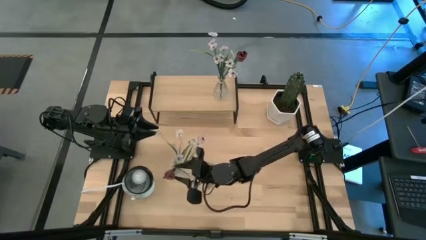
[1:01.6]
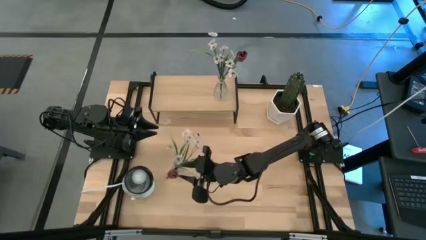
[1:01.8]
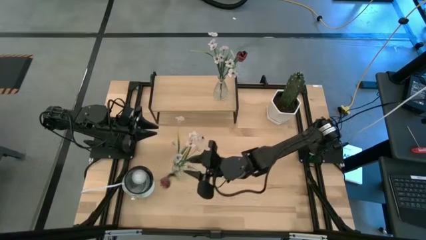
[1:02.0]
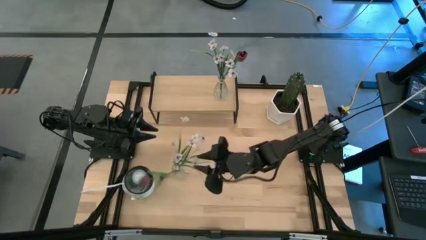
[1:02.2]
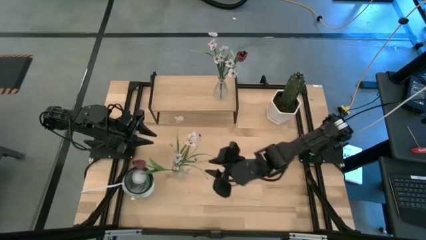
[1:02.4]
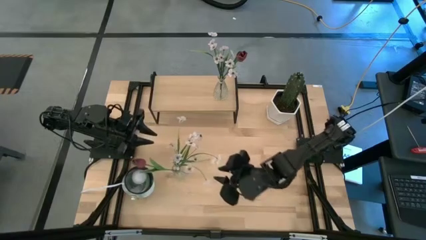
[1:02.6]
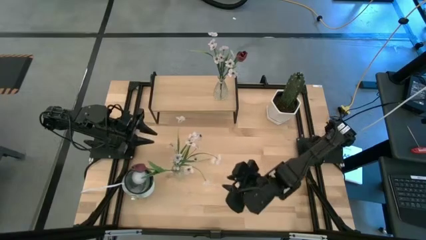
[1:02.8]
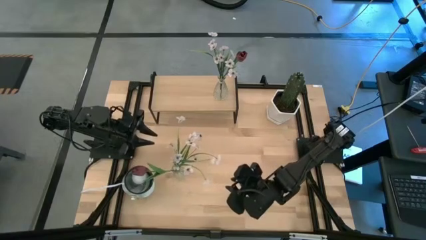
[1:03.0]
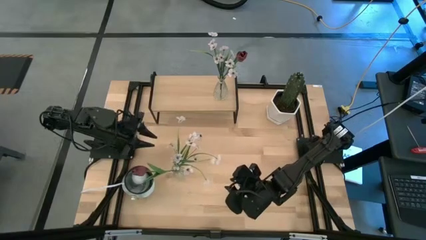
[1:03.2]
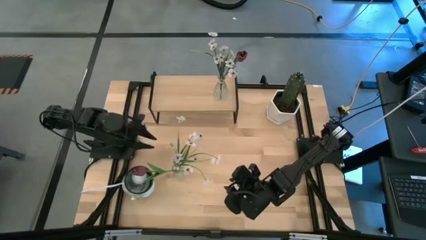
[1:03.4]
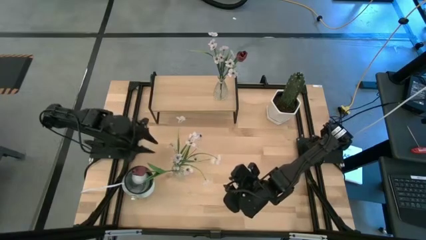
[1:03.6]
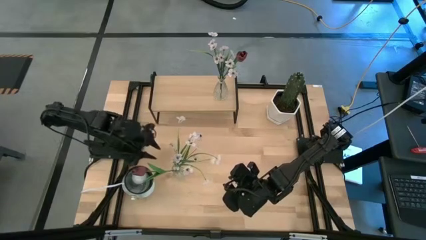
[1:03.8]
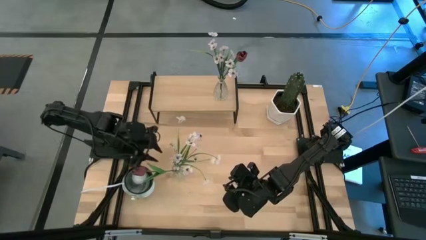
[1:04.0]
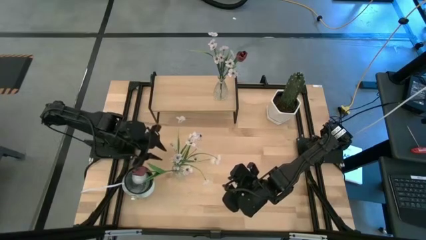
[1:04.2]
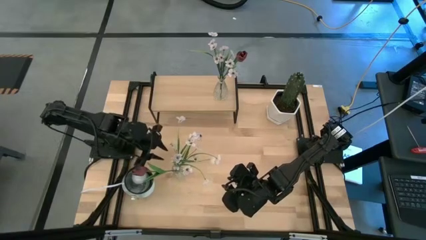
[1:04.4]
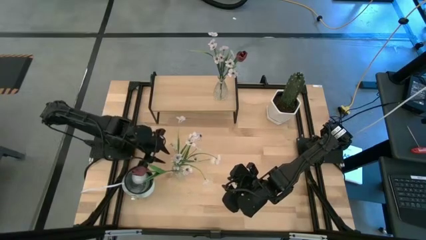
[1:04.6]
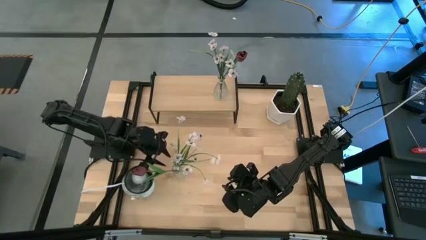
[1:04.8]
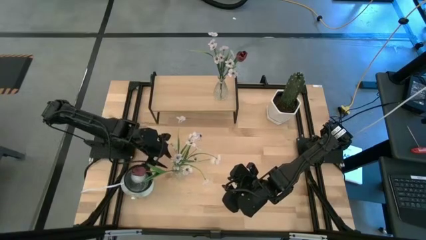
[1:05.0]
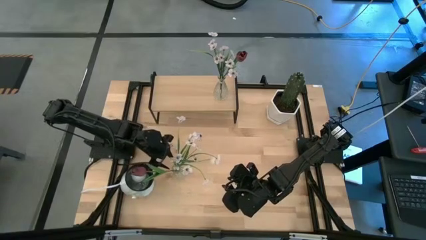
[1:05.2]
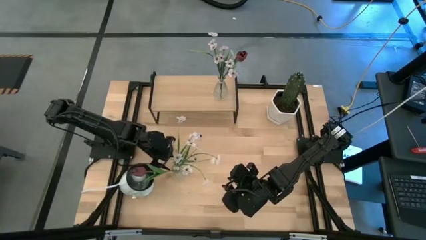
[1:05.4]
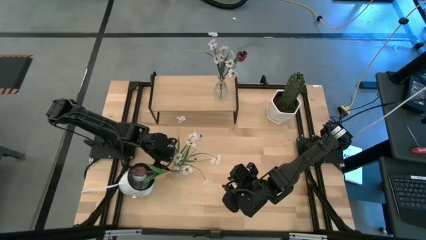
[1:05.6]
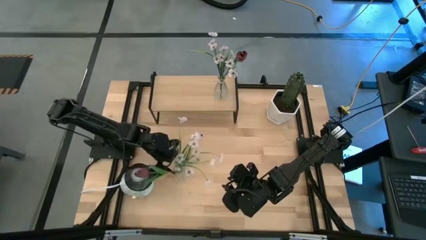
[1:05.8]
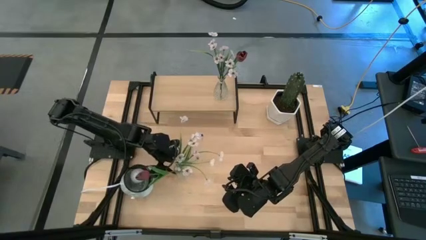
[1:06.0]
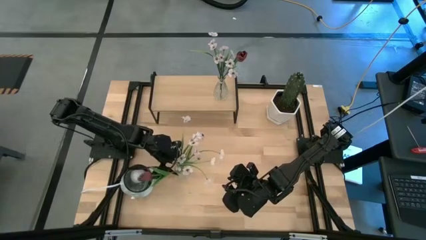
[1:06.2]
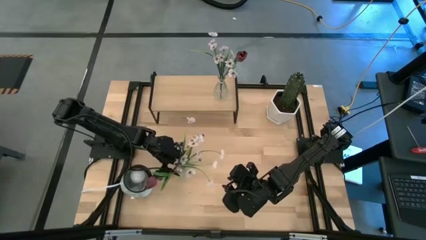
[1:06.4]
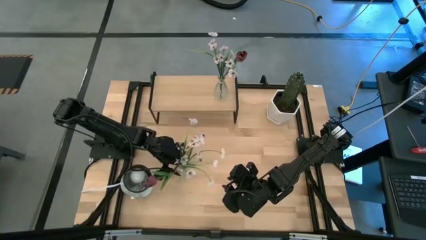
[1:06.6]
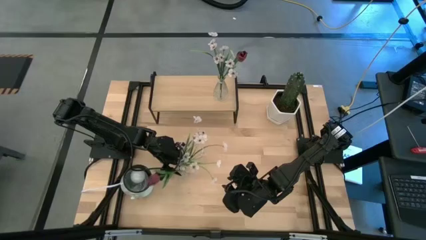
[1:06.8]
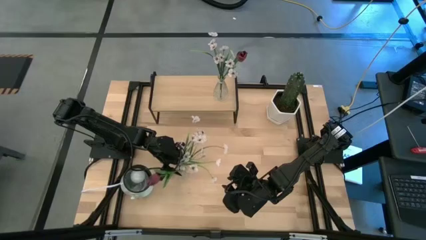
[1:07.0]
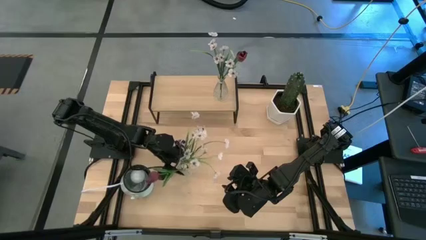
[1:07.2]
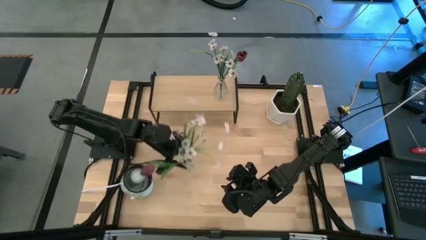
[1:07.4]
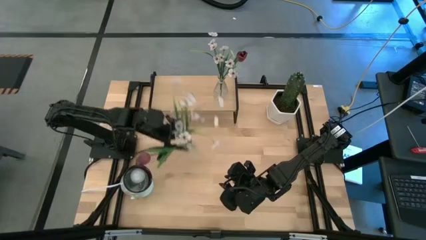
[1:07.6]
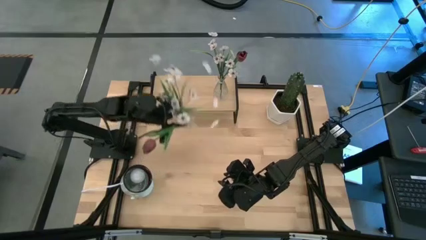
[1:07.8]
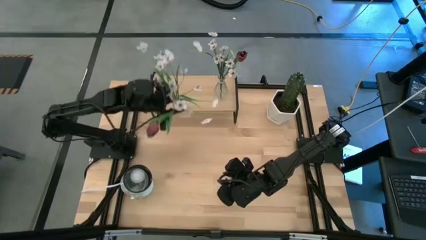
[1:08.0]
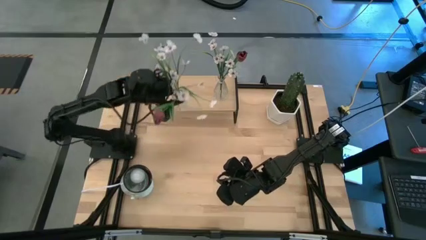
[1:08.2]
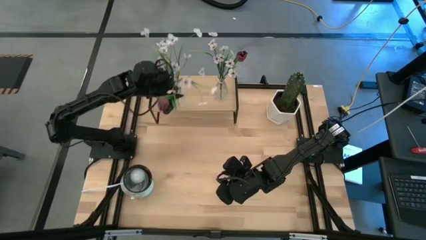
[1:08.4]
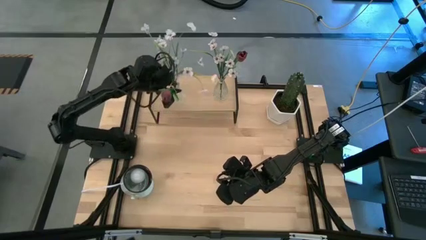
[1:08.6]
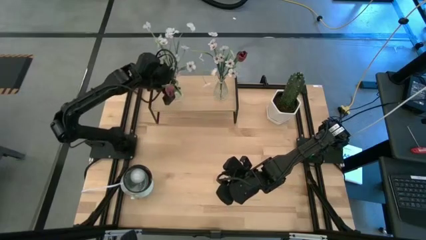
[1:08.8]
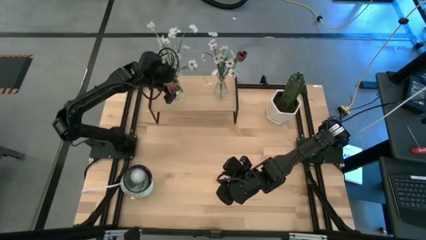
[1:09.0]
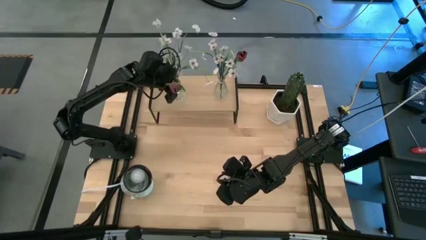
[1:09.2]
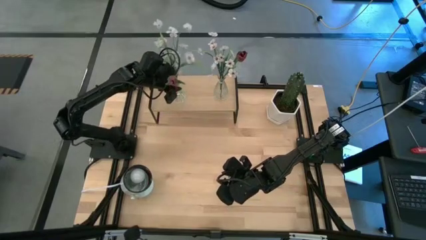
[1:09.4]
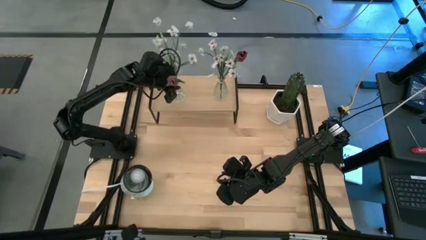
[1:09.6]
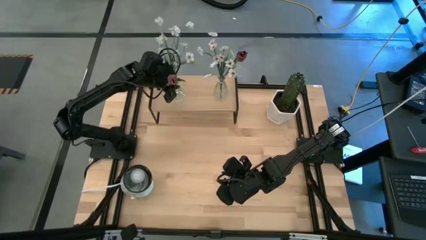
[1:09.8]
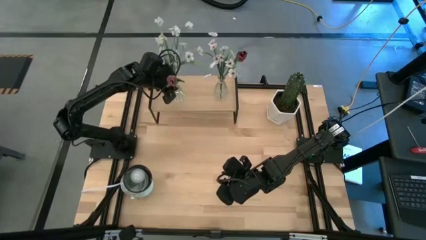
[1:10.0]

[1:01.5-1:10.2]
Task: Pick and place flowers into a vace then onto a shelf
Put the transparent vase with flowers on the shelf

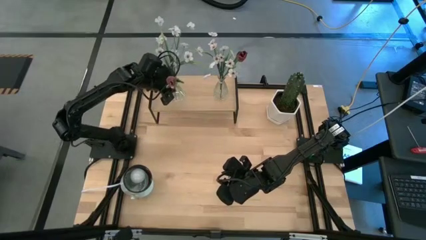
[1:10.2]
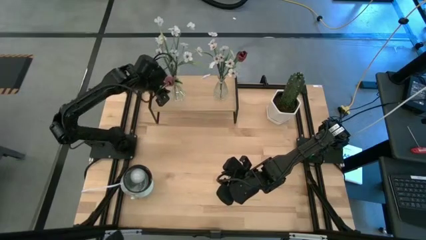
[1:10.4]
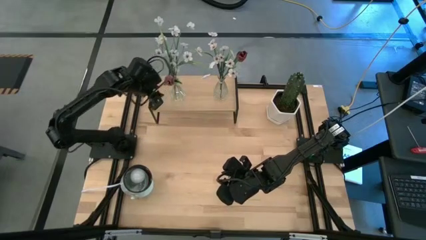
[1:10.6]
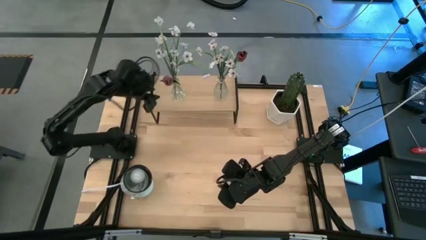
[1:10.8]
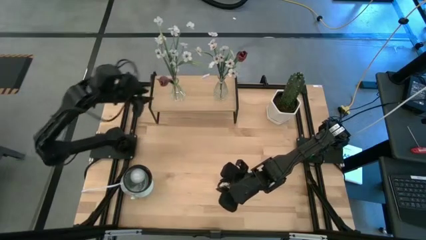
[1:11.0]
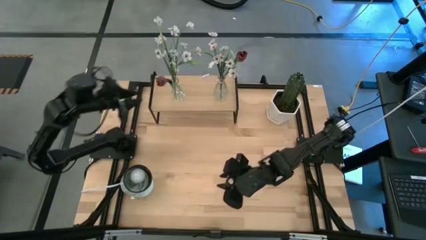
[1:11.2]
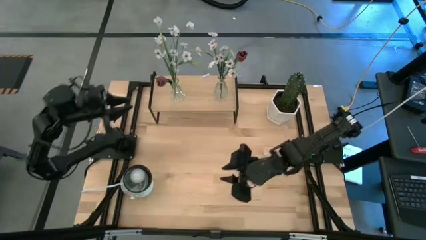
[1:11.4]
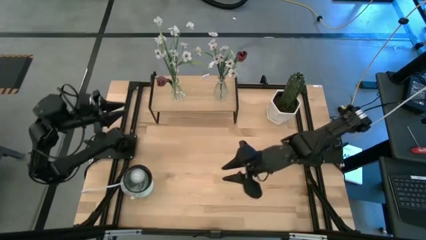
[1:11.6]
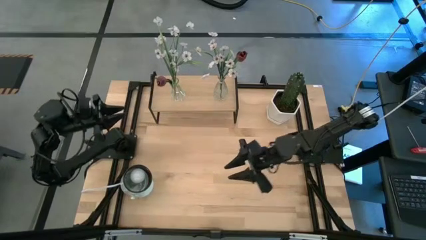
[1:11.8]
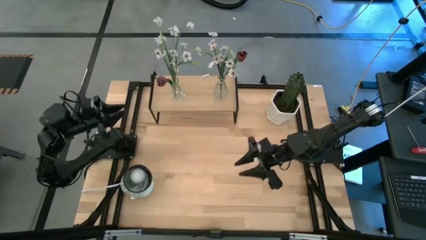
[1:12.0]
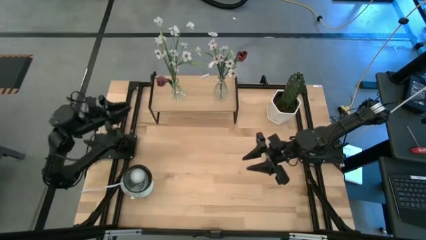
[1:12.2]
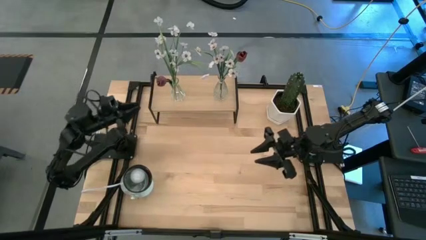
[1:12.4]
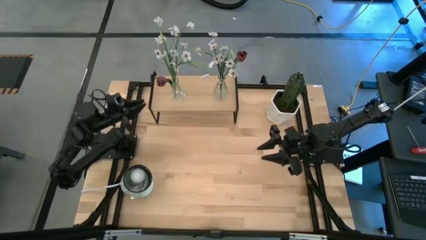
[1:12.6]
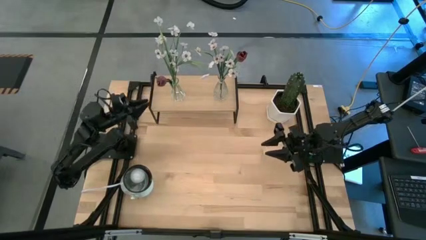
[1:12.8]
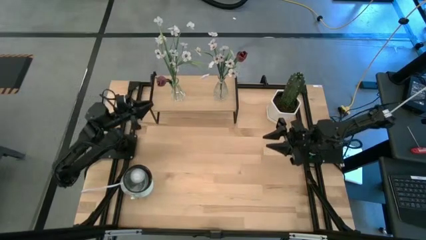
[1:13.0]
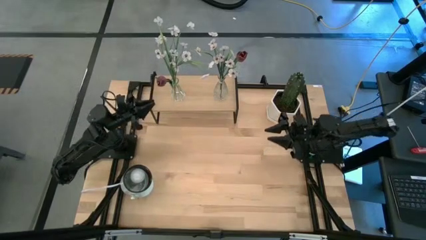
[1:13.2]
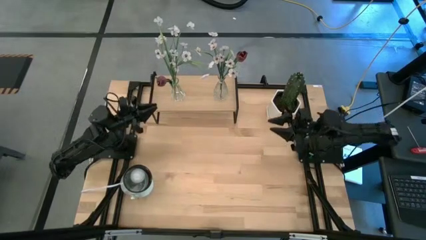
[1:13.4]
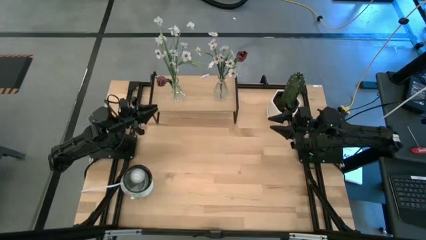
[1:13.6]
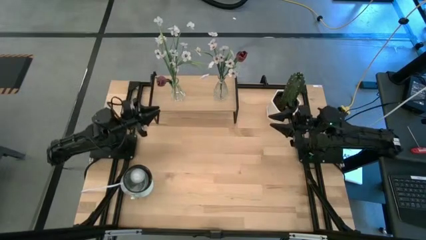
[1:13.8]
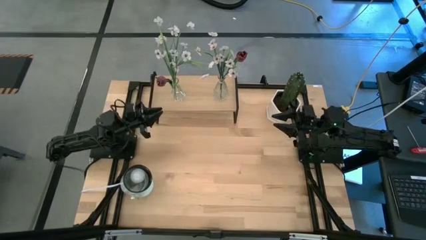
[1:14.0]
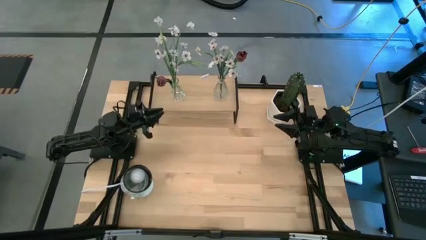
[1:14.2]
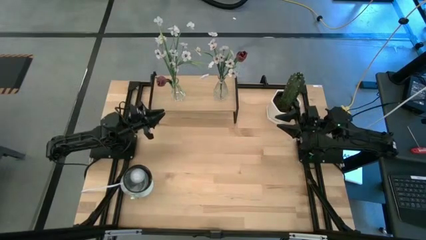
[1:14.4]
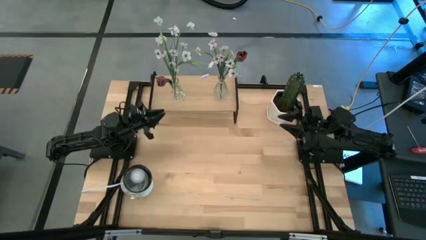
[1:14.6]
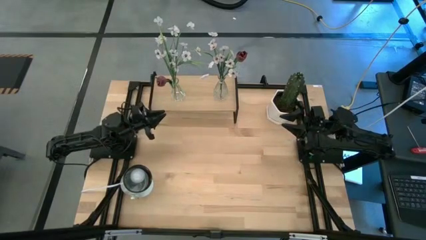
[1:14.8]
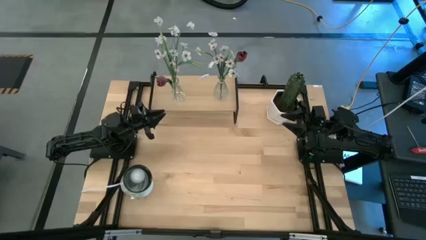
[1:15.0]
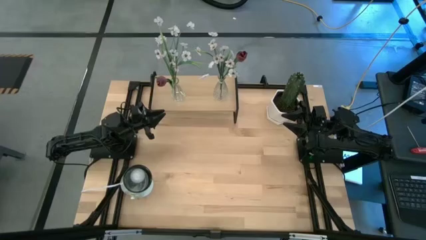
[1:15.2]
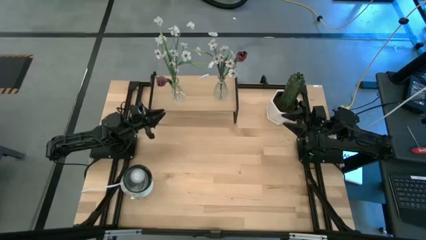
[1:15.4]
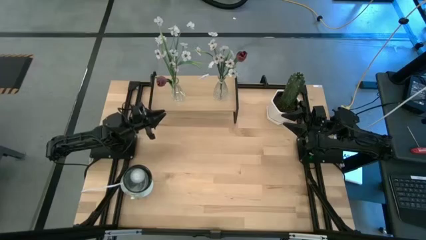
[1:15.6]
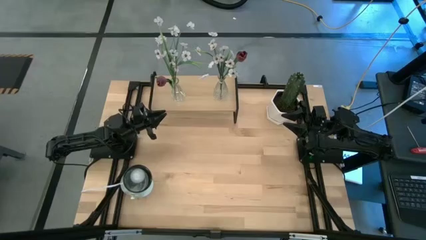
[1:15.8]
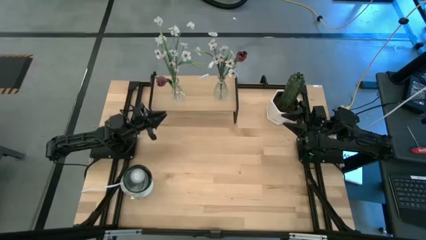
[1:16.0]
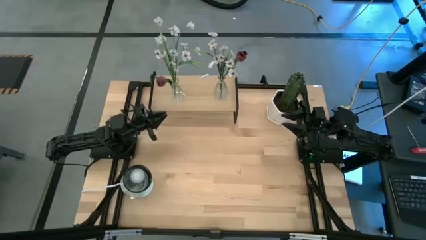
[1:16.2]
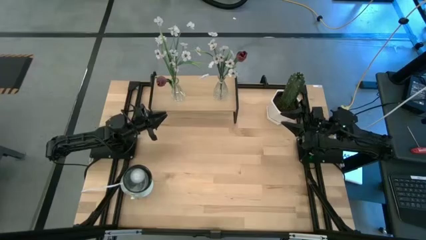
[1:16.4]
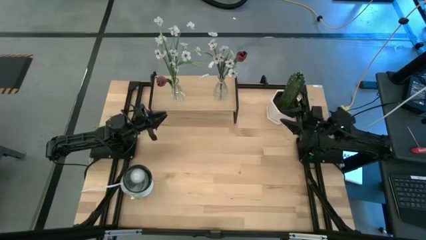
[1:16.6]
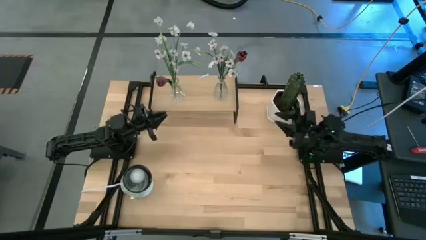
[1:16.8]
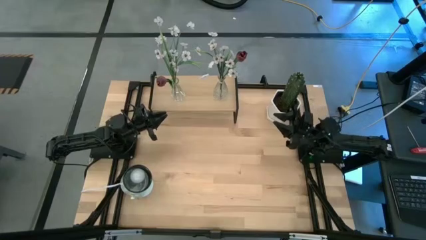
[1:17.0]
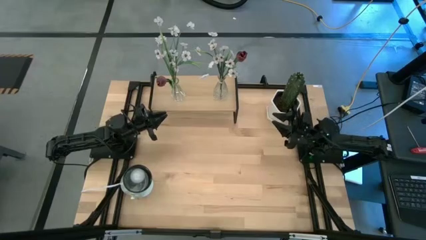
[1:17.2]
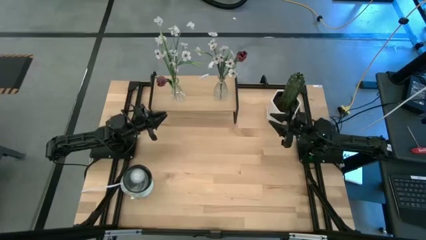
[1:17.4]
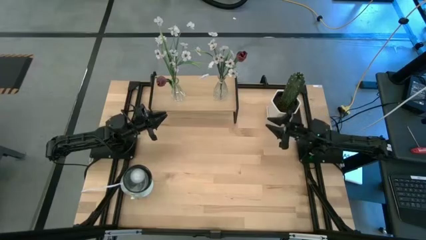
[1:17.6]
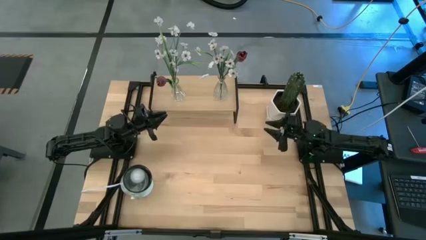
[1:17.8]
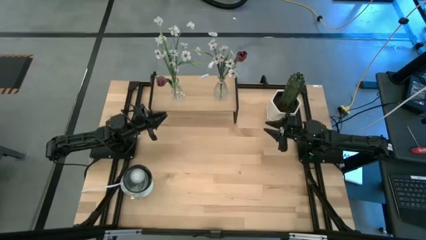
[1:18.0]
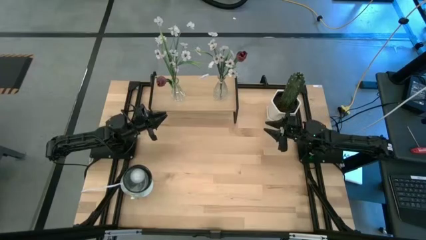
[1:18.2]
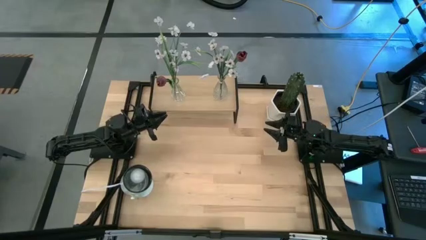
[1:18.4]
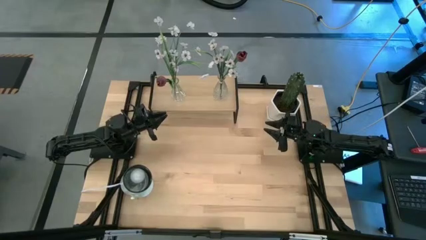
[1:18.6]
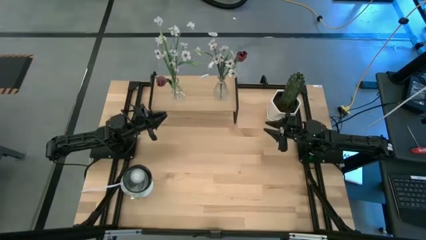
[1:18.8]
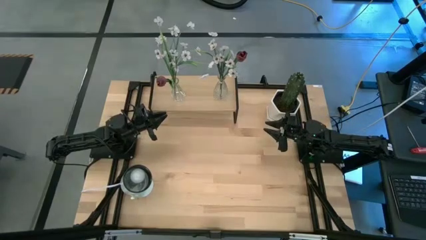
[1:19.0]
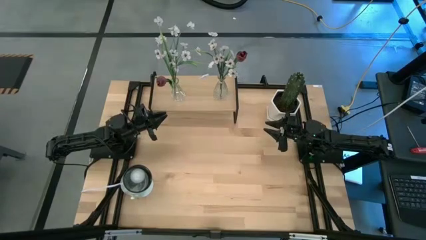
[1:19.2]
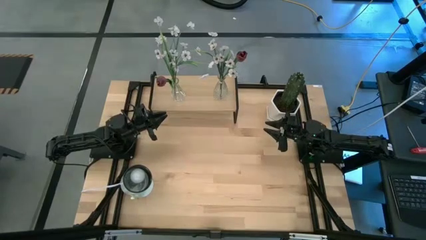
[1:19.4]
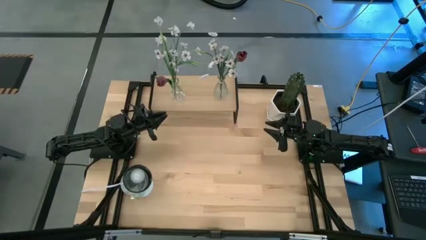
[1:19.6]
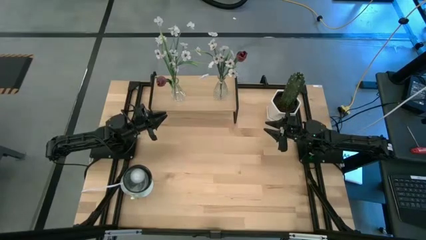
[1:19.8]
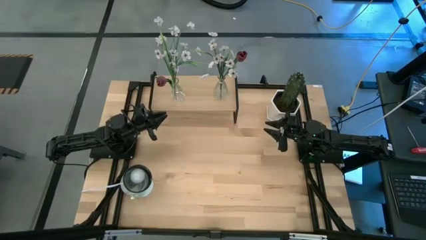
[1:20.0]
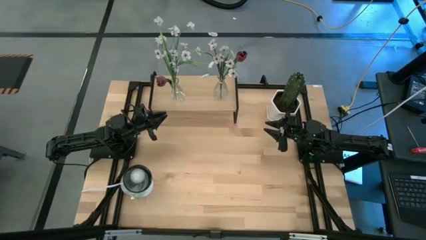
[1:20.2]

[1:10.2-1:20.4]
Return to Home Position
